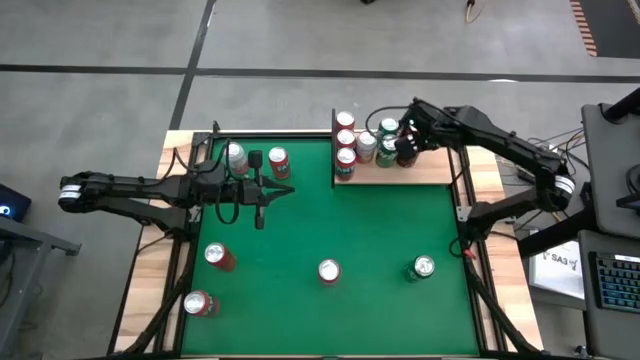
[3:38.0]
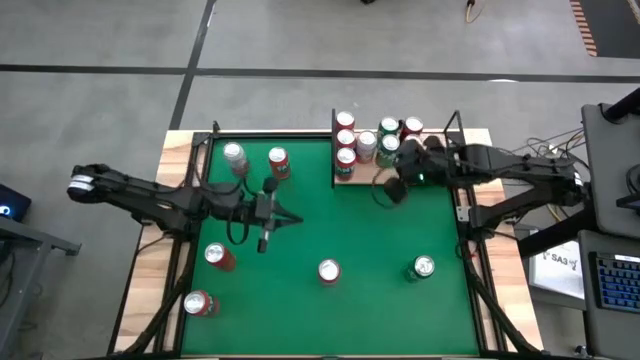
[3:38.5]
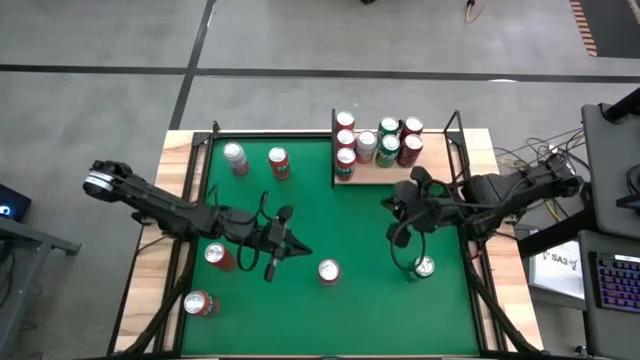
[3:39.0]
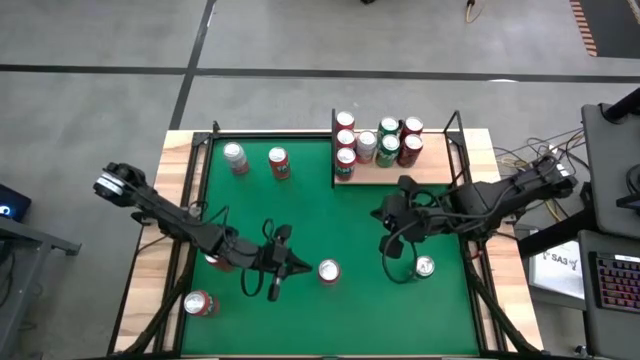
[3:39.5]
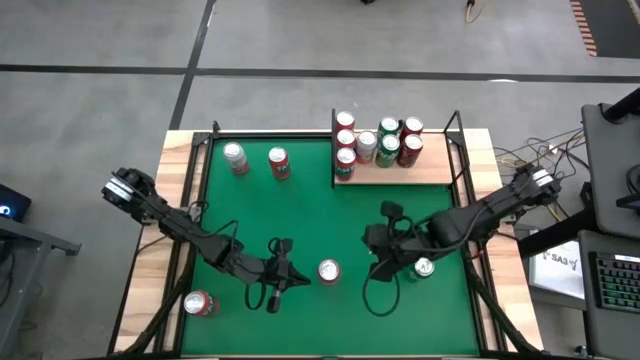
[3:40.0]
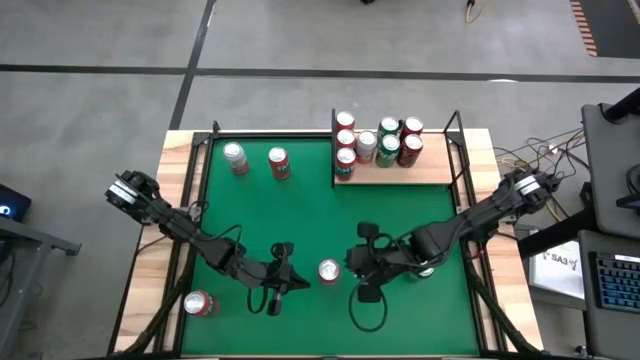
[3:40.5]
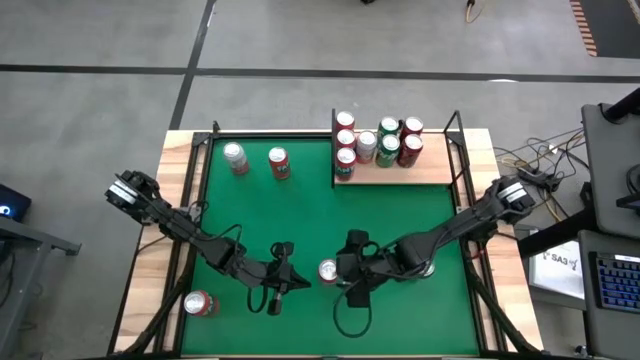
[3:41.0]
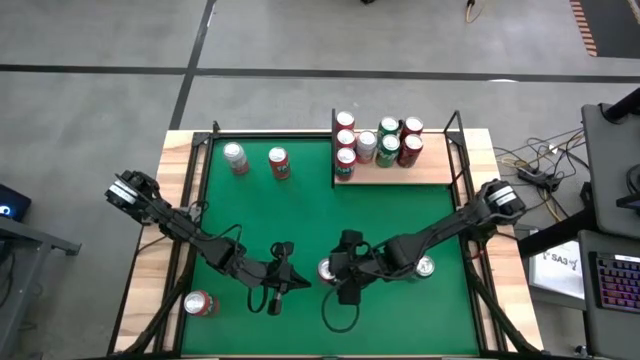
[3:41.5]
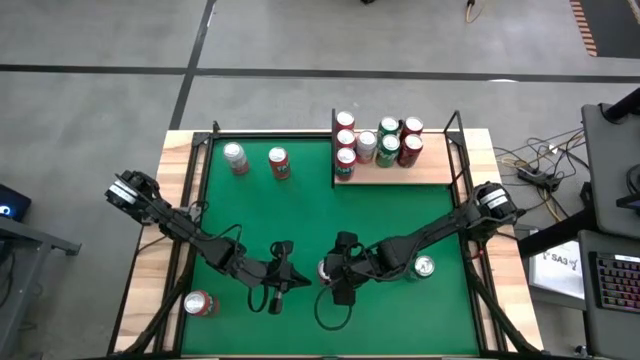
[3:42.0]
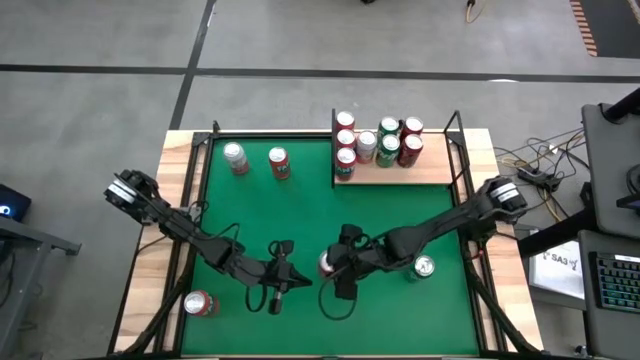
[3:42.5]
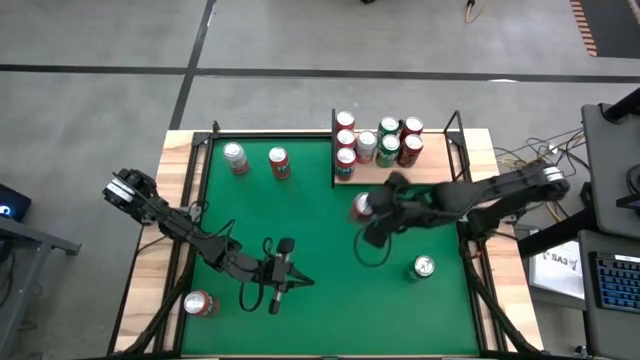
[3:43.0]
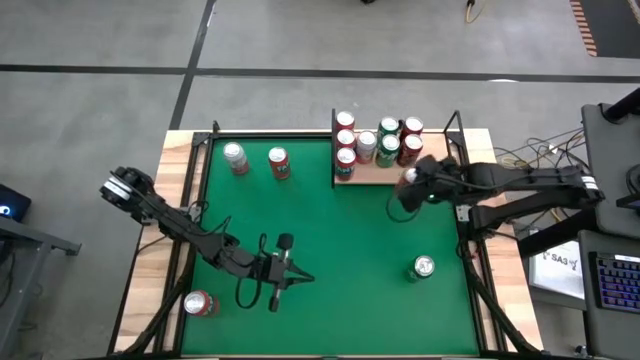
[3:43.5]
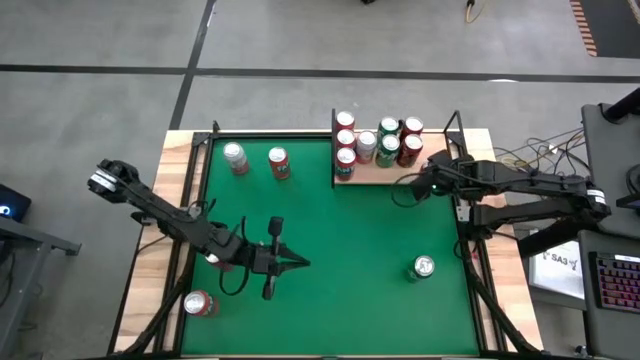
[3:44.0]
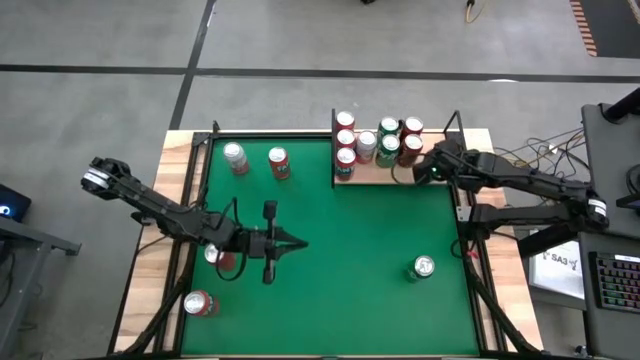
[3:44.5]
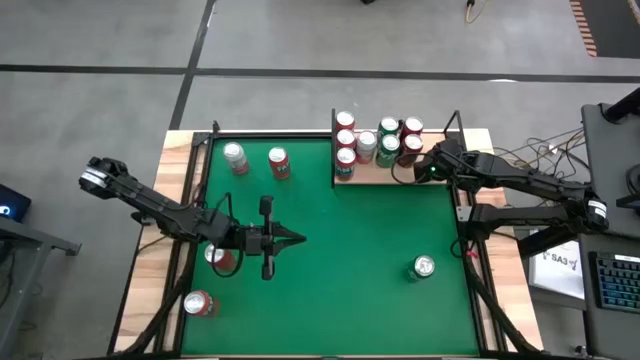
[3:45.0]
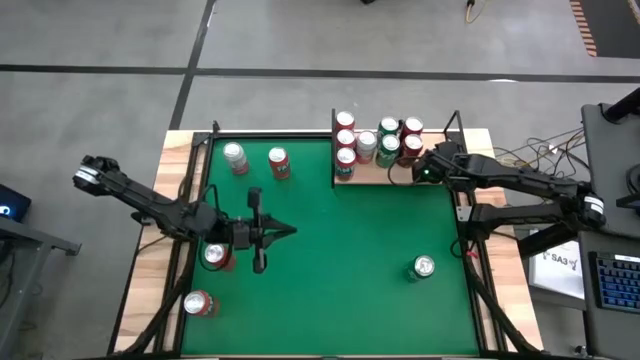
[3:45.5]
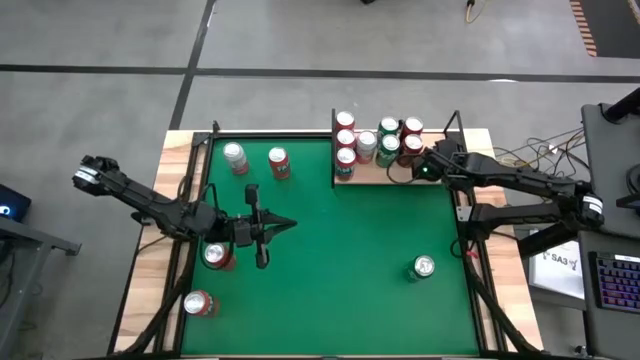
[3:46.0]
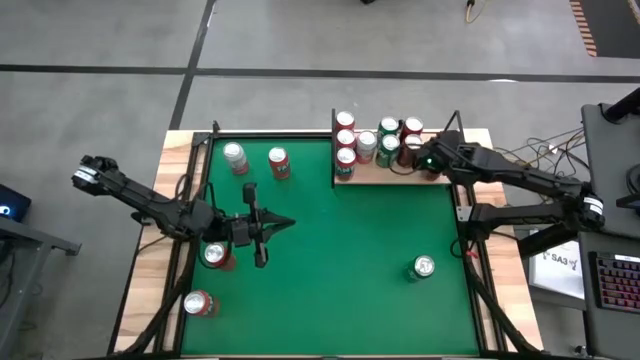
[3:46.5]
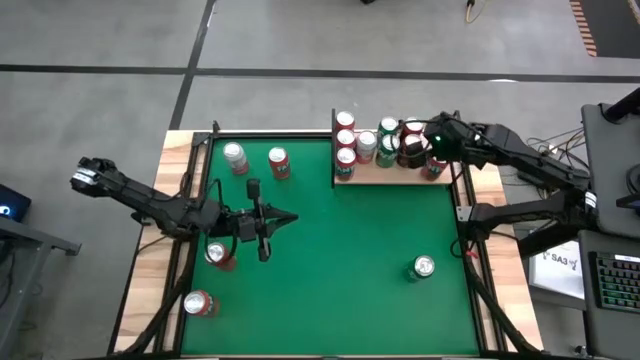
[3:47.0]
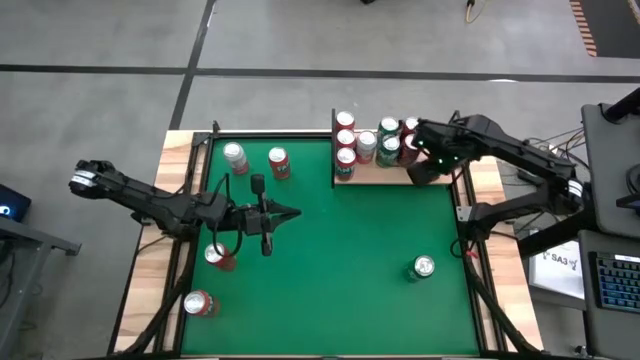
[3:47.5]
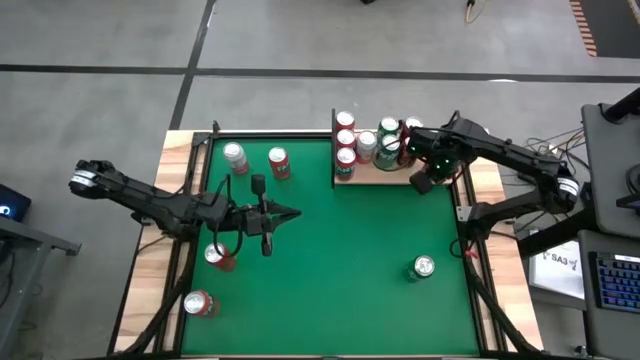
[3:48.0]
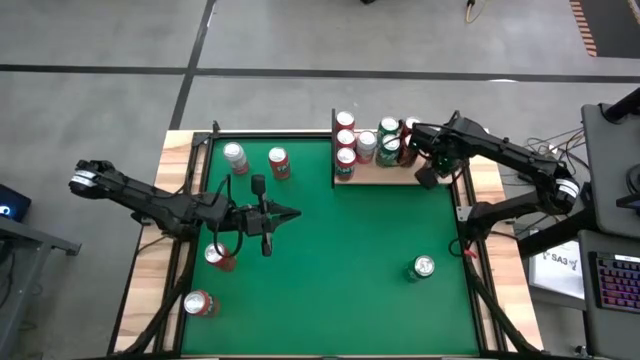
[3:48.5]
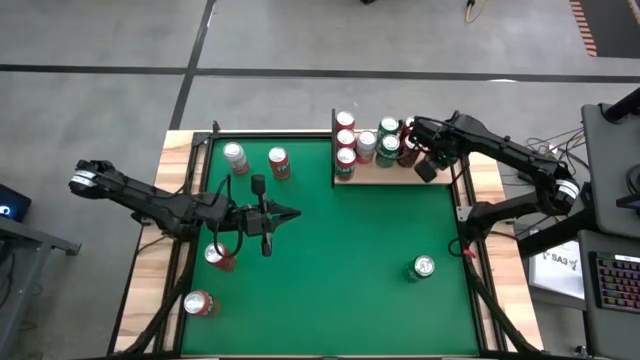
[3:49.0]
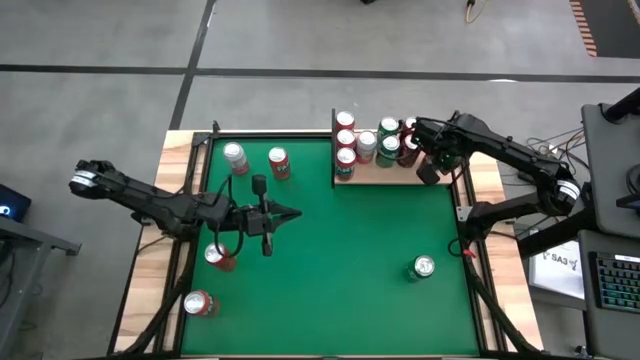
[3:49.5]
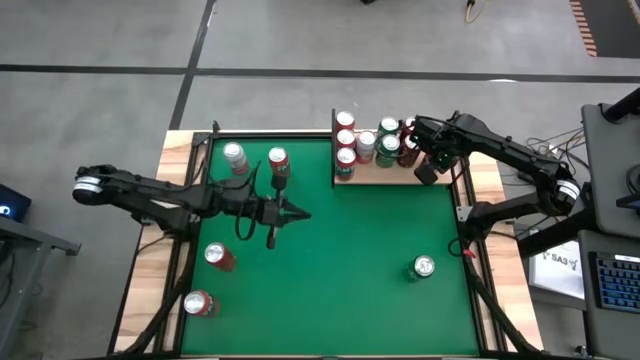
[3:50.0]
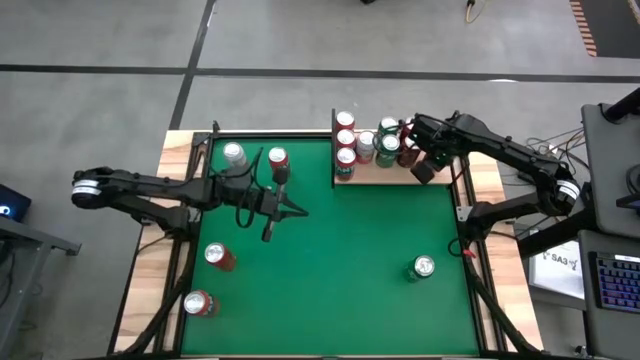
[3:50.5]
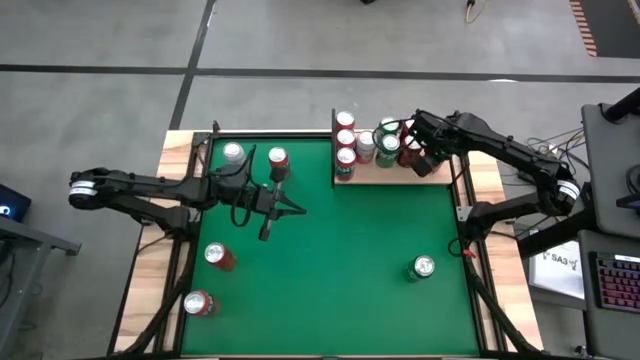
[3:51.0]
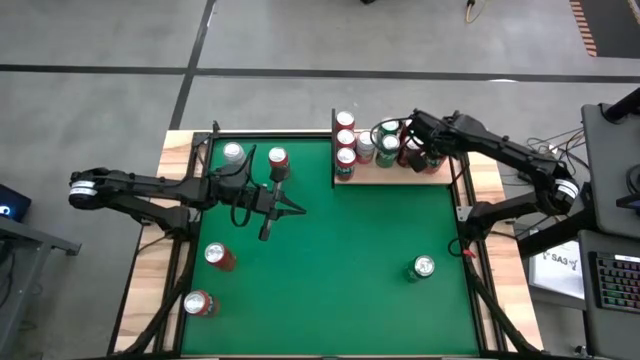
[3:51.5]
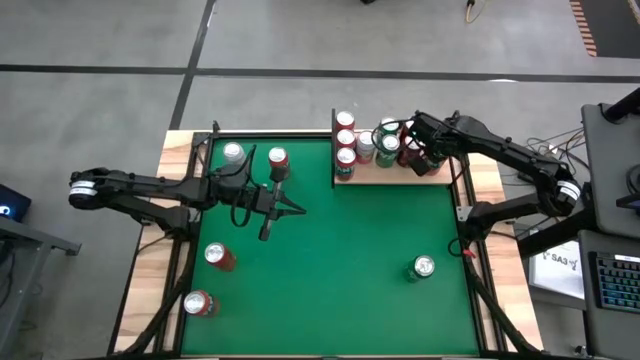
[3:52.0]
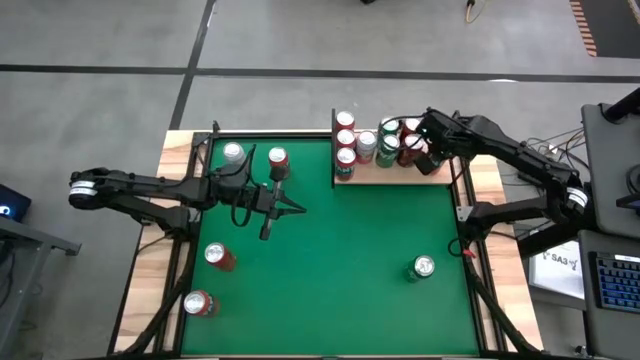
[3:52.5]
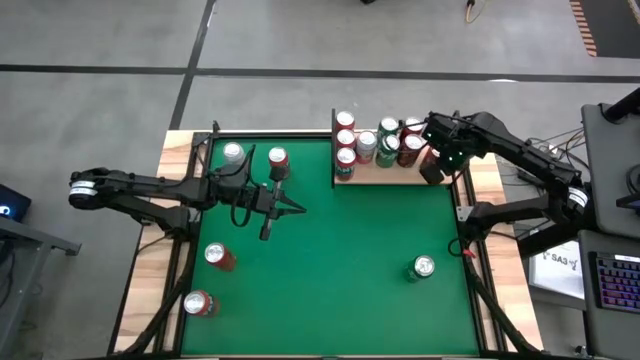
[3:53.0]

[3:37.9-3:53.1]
Task: Place canned beverage on shelf
Put the red soda can on the shelf

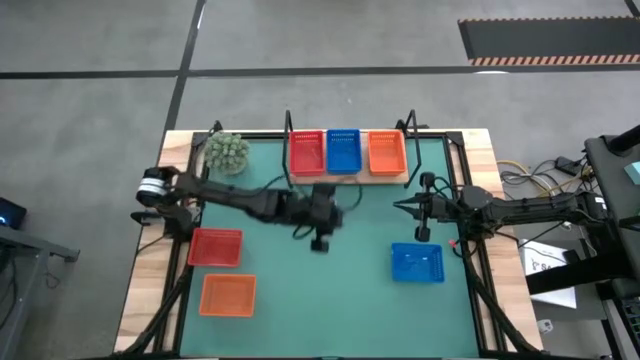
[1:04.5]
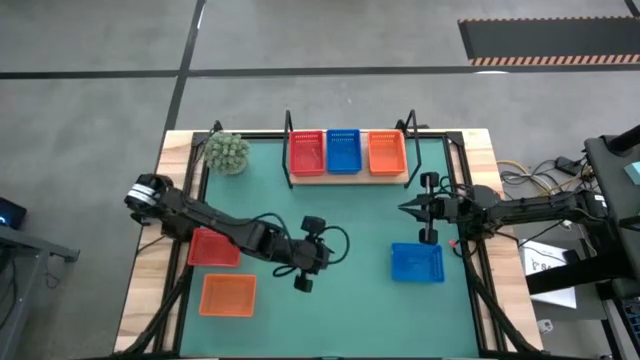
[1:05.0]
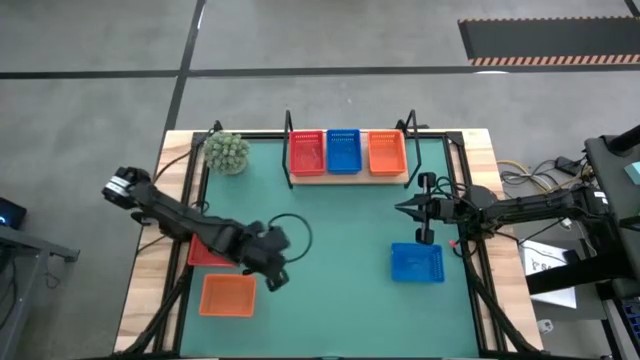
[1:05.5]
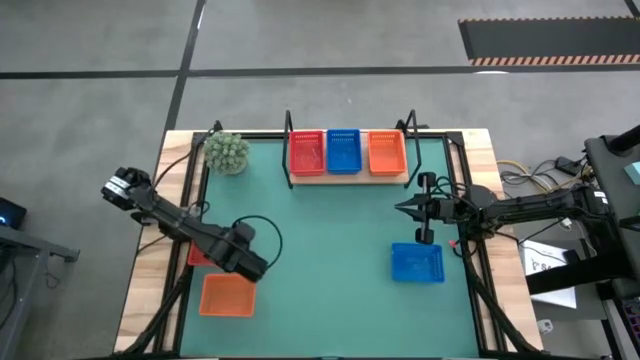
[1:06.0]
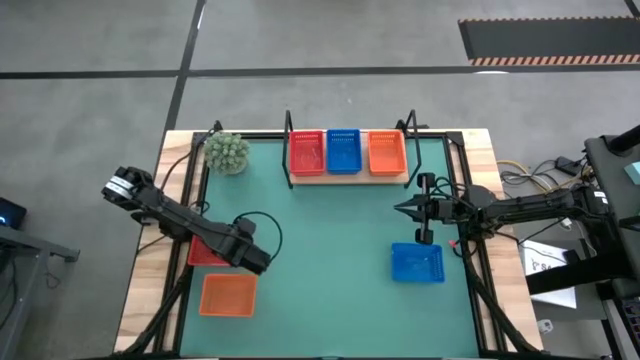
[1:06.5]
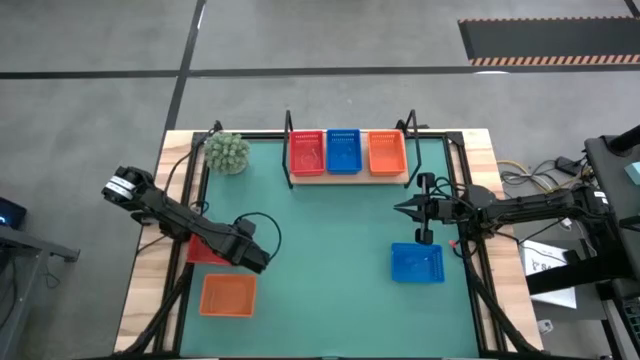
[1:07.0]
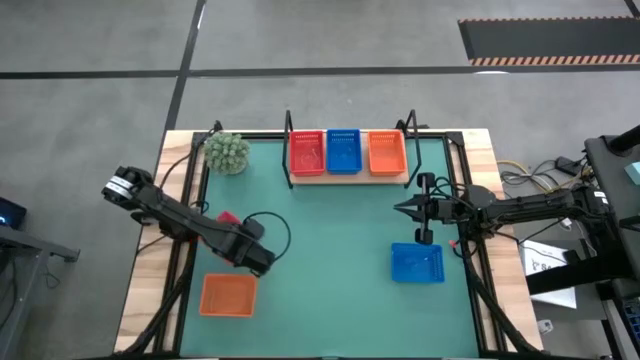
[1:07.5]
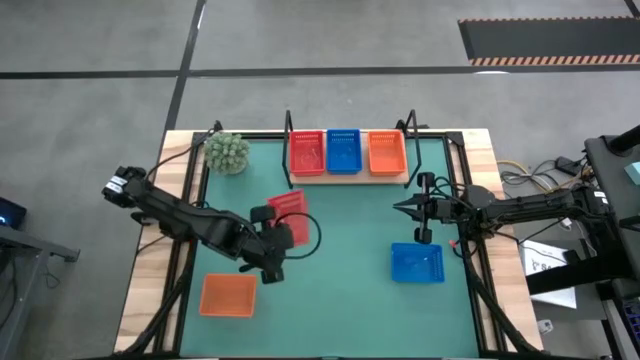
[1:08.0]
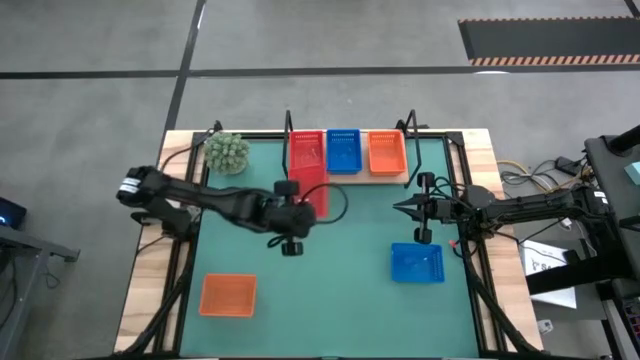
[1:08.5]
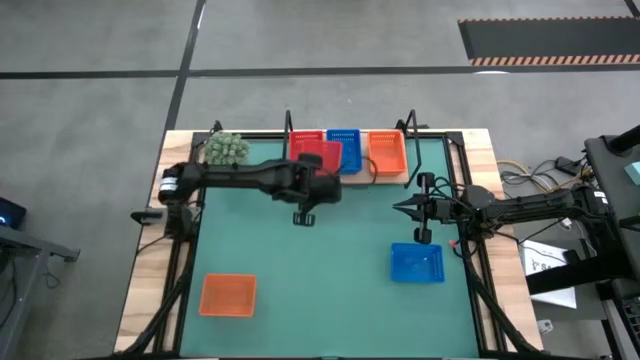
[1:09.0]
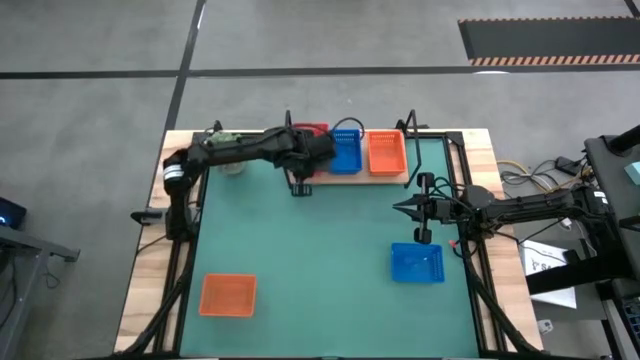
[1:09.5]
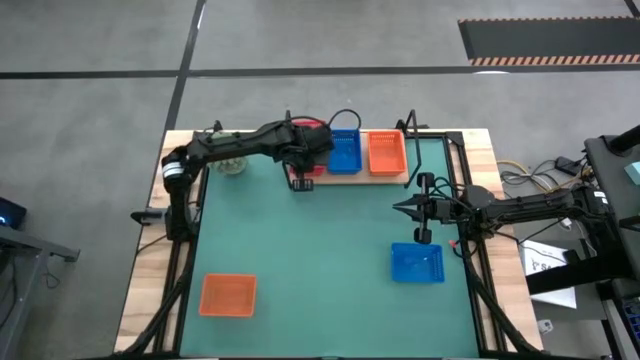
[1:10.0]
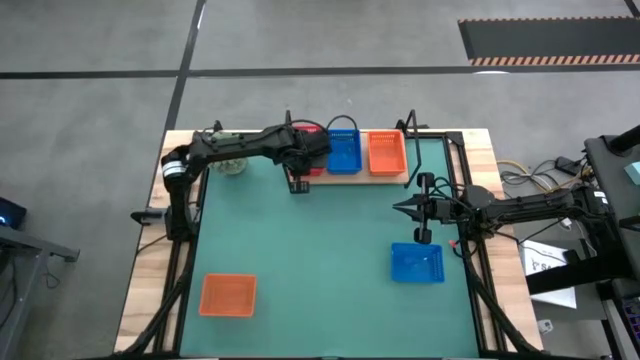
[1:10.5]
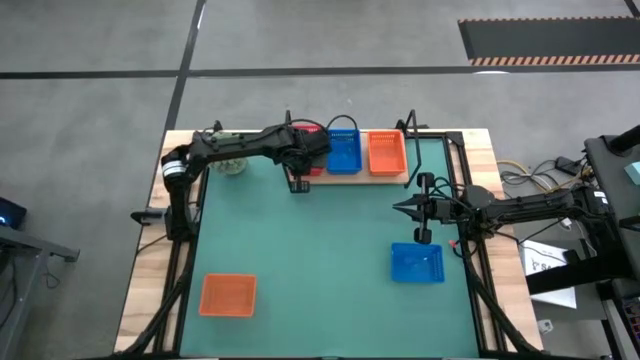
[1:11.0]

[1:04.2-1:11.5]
Task: Stack baskets on shelf by color
Stack the red bin on top of the stacked red bins on the shelf
